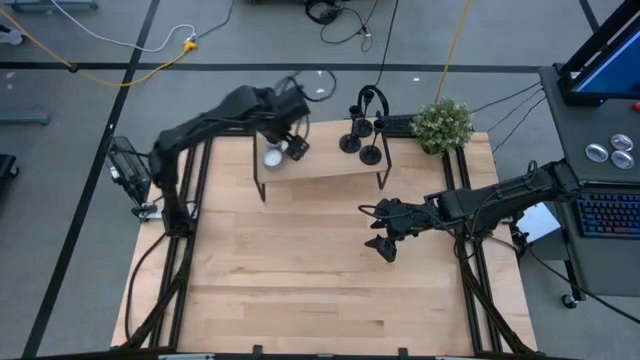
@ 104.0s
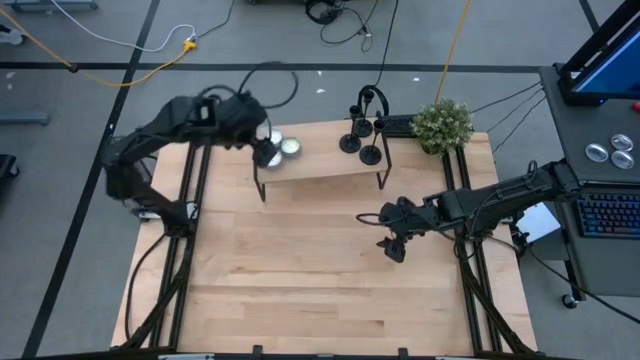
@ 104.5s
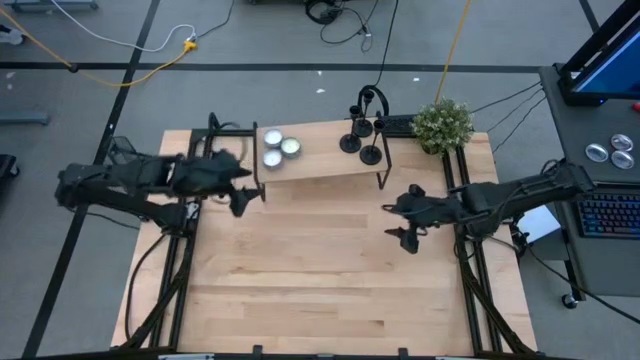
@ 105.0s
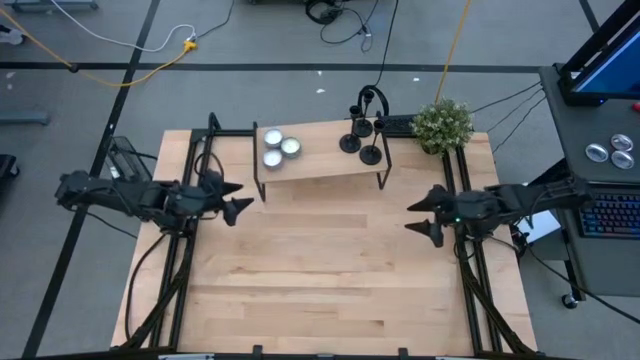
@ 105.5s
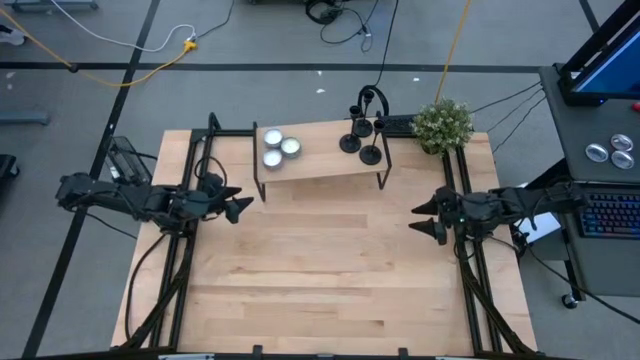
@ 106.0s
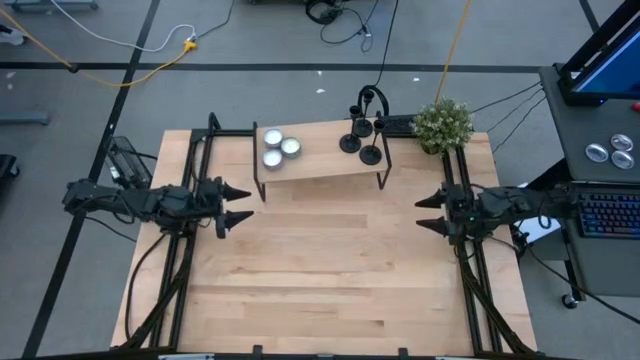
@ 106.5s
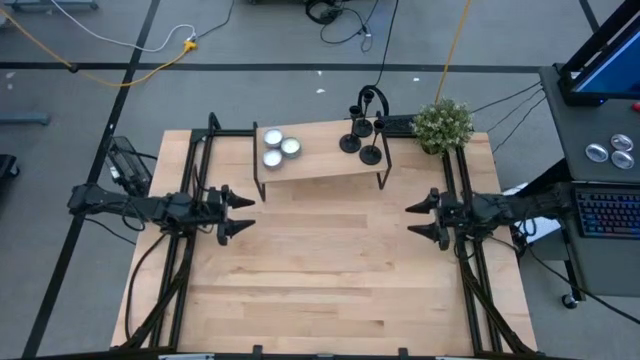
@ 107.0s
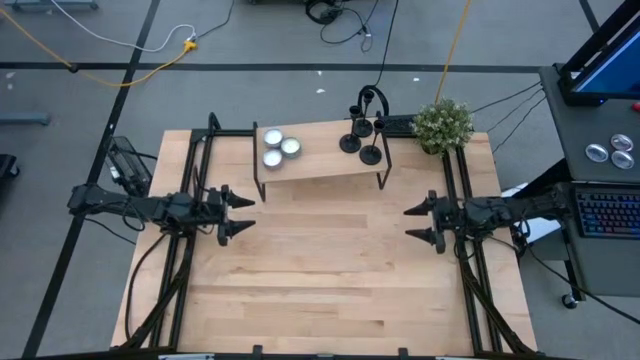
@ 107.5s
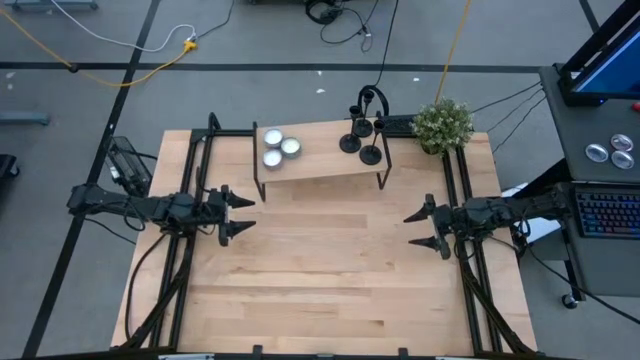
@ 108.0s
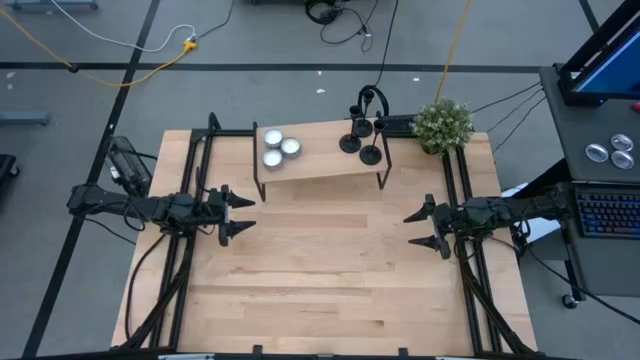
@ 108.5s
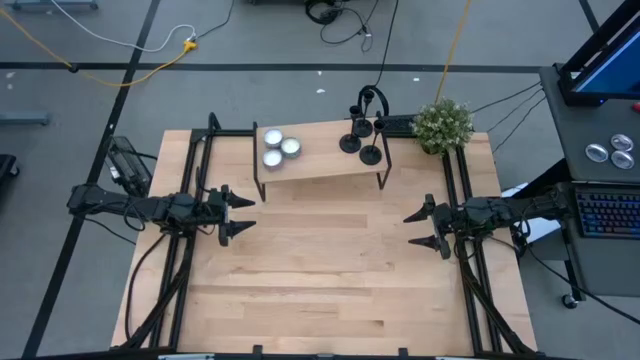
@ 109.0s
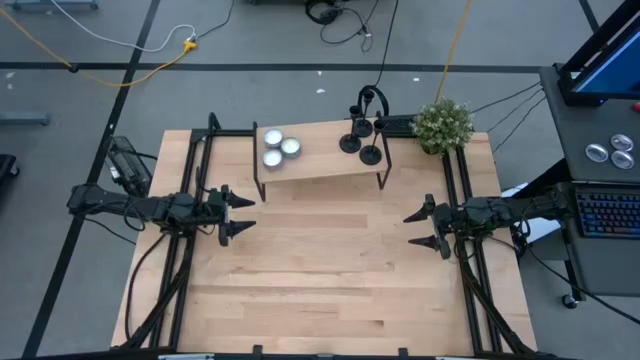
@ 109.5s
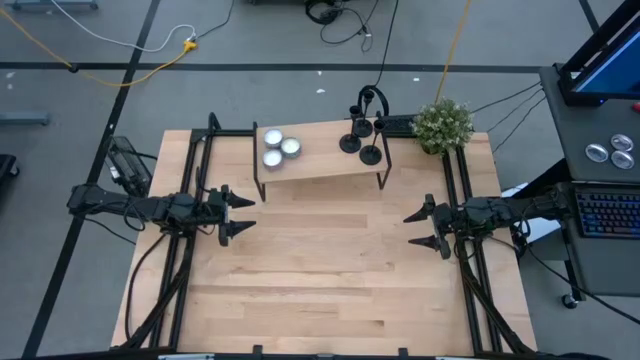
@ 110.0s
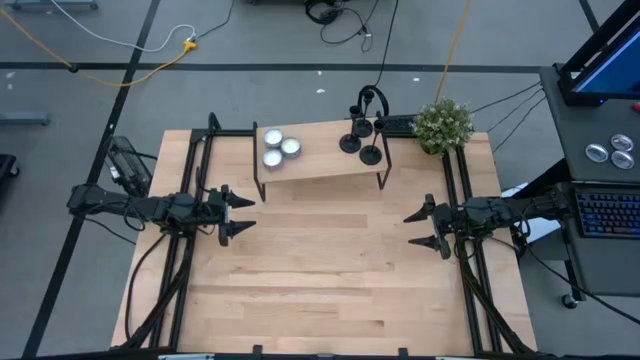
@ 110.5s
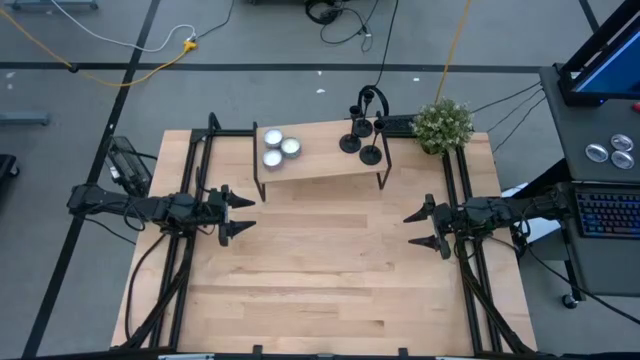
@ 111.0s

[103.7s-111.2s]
Task: Pick & Place candle stick holders
Return to Home Position

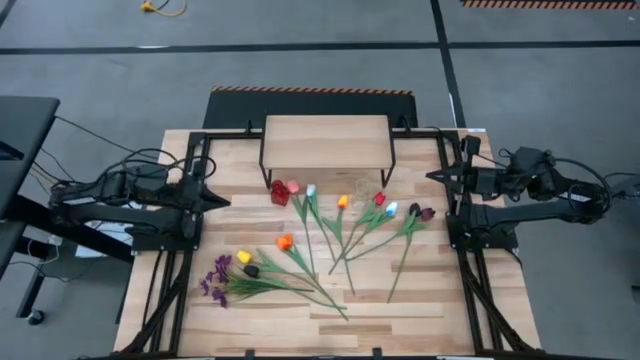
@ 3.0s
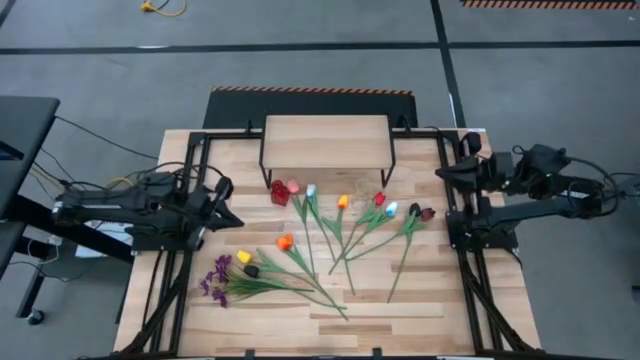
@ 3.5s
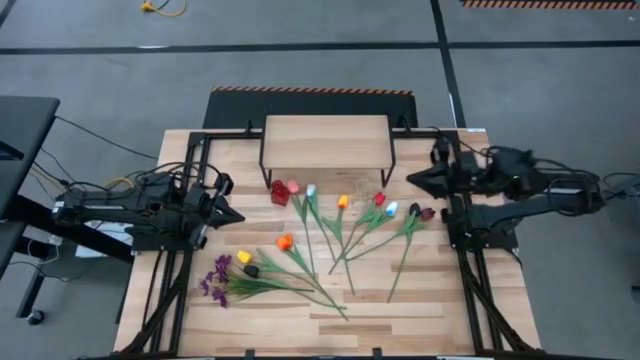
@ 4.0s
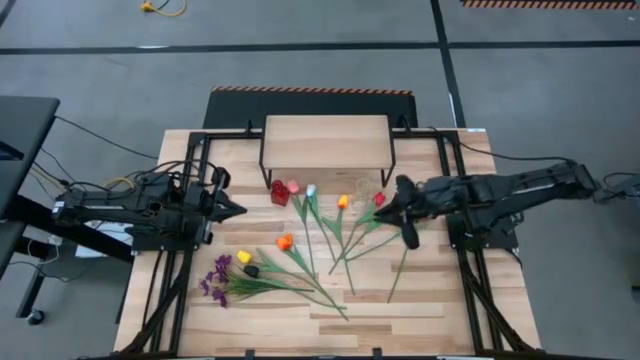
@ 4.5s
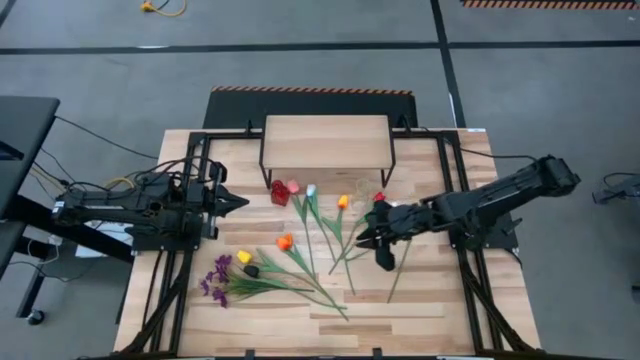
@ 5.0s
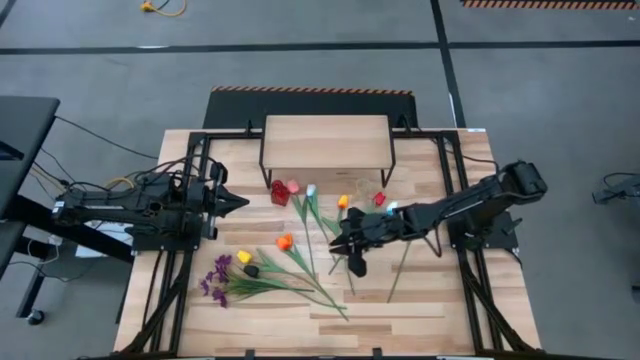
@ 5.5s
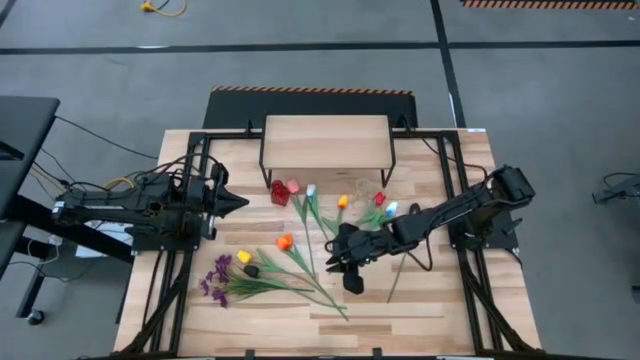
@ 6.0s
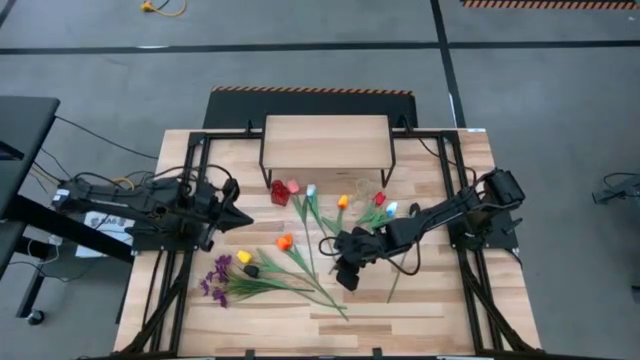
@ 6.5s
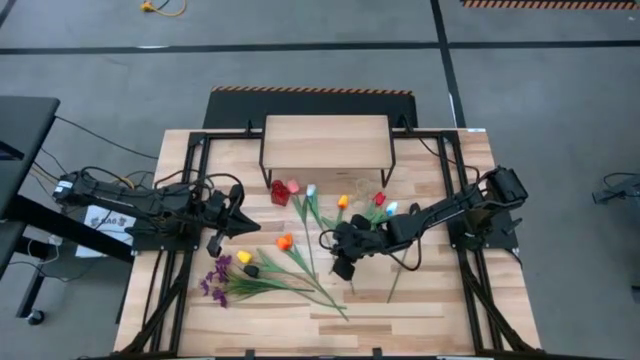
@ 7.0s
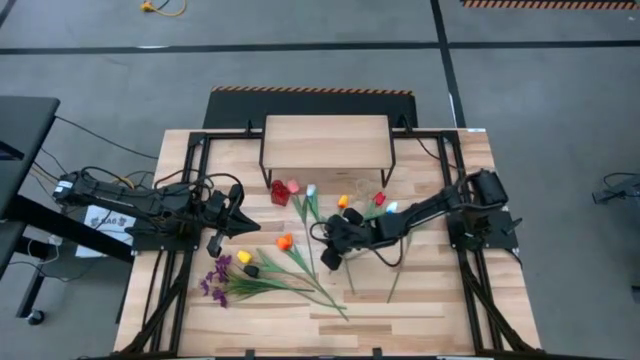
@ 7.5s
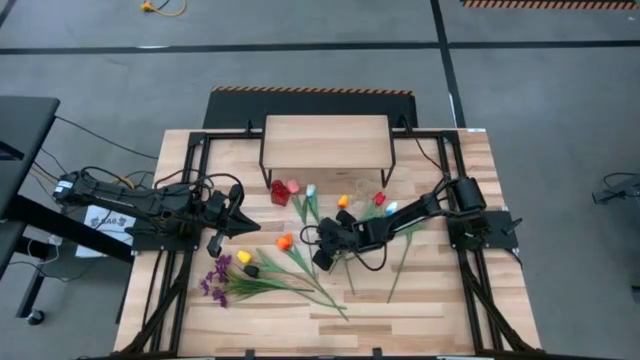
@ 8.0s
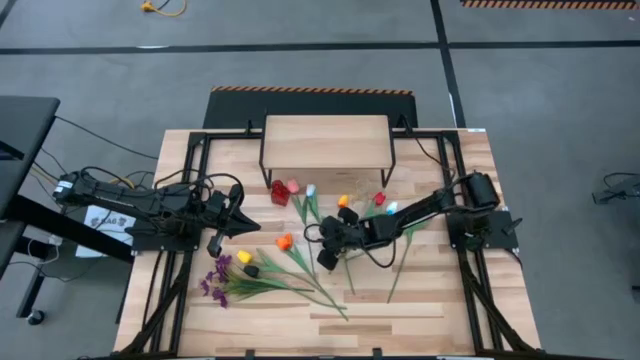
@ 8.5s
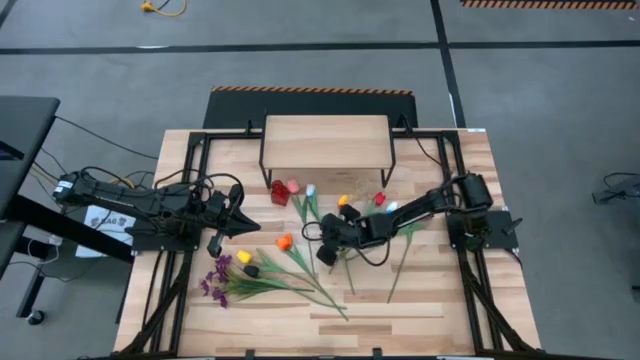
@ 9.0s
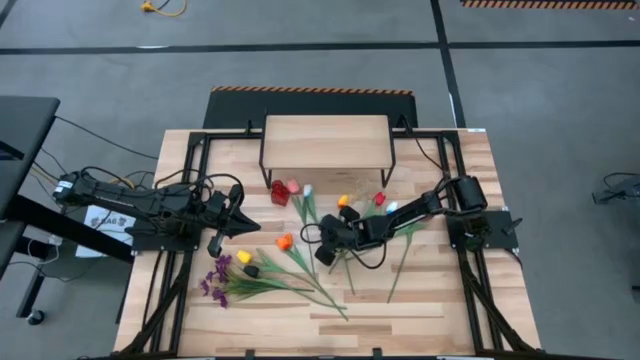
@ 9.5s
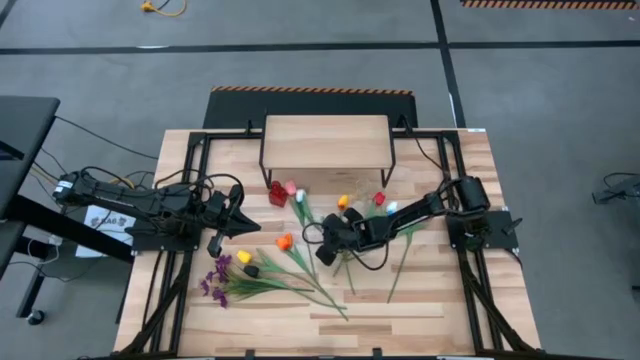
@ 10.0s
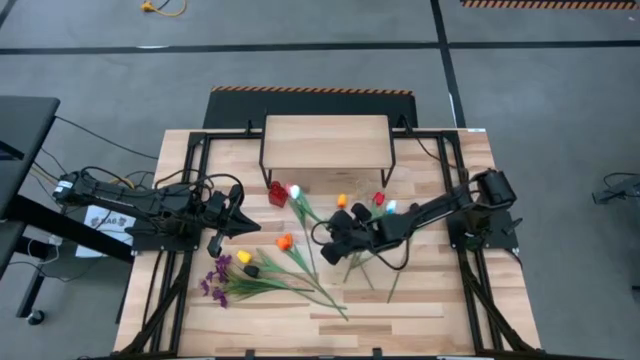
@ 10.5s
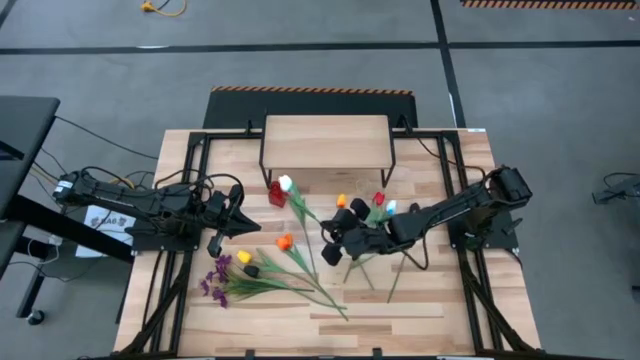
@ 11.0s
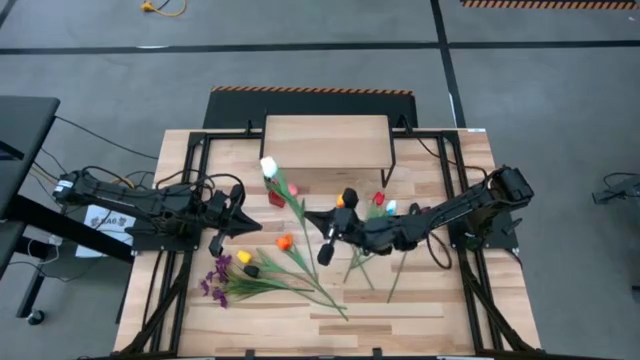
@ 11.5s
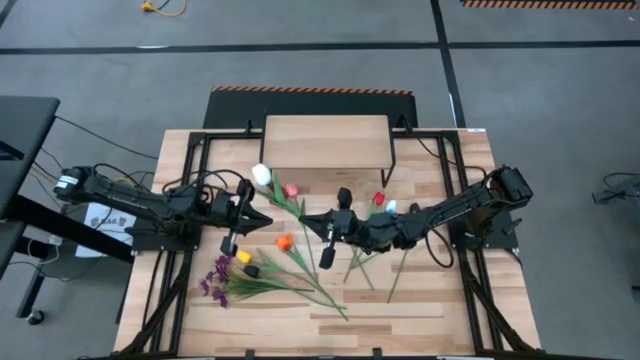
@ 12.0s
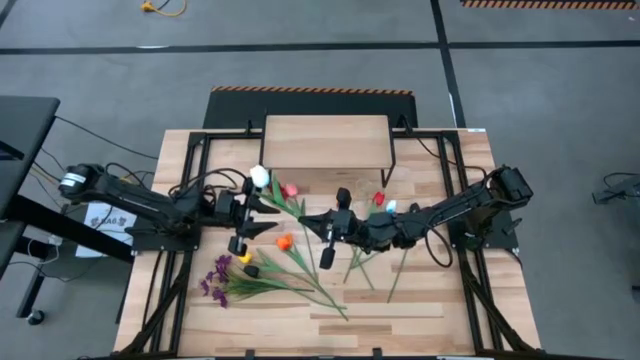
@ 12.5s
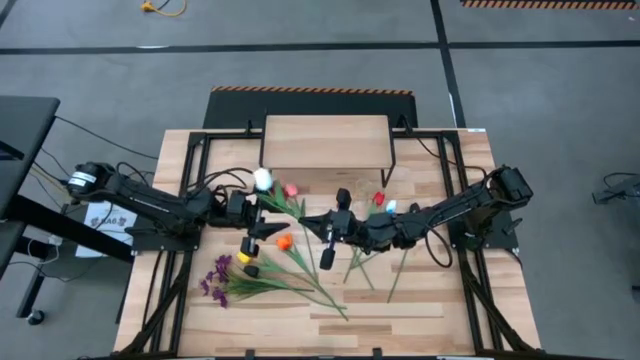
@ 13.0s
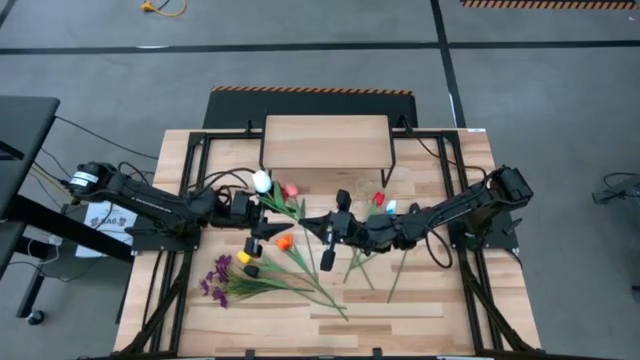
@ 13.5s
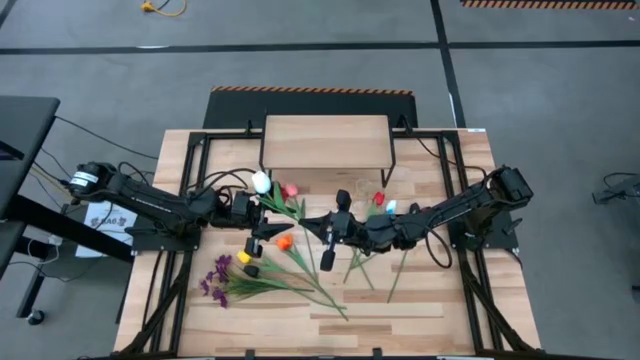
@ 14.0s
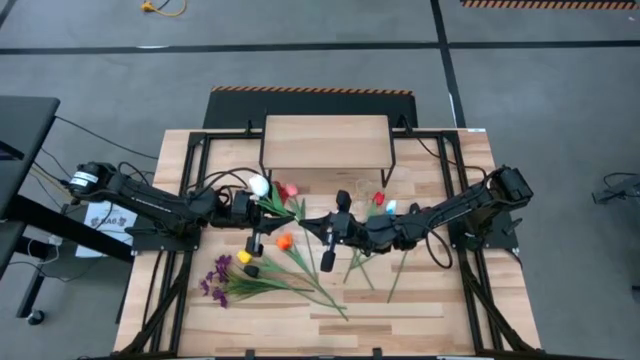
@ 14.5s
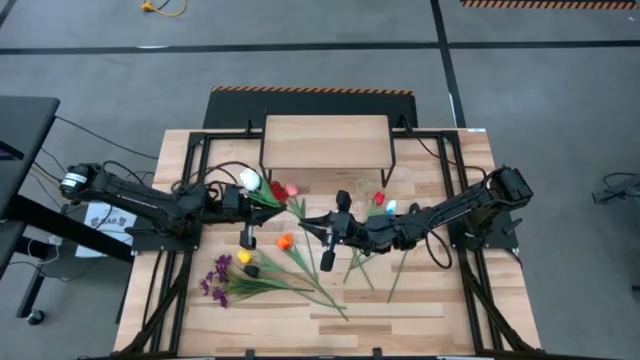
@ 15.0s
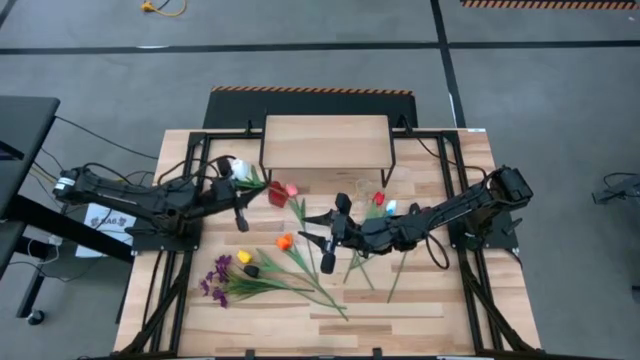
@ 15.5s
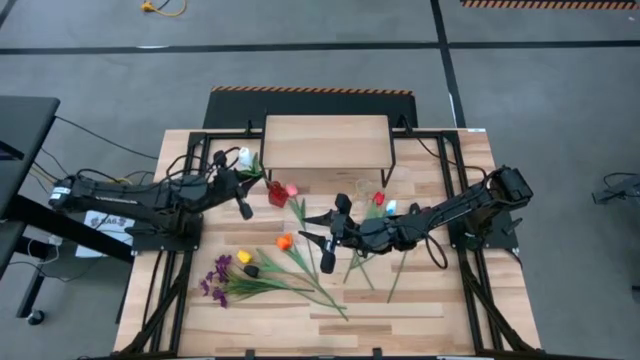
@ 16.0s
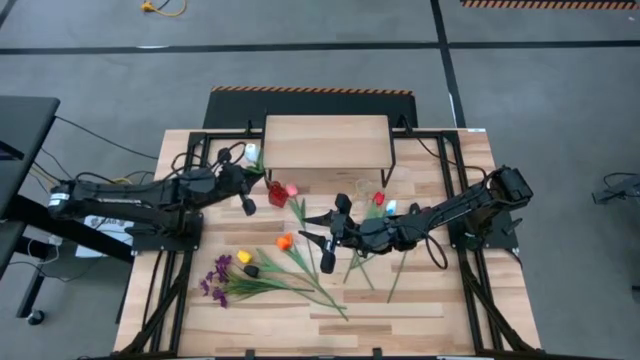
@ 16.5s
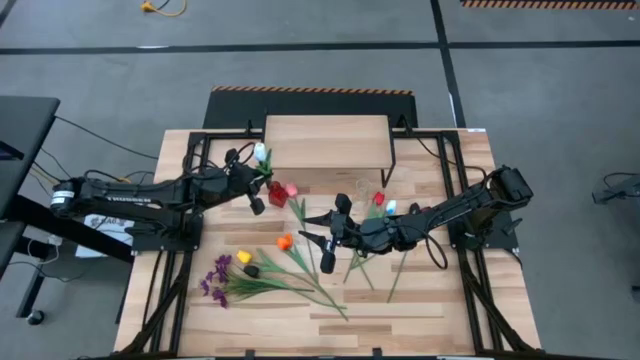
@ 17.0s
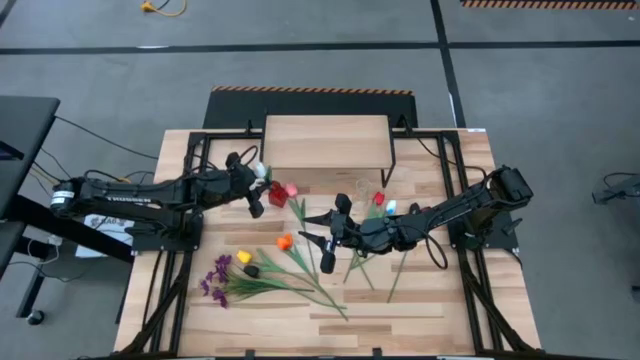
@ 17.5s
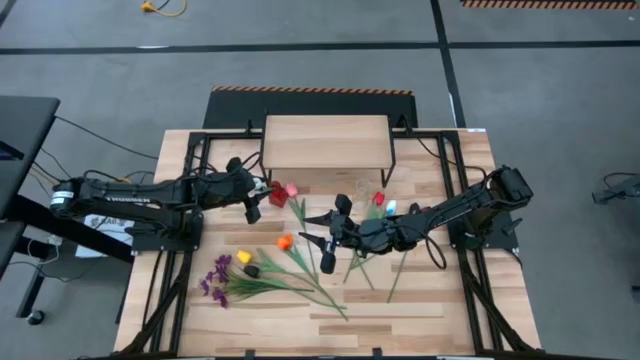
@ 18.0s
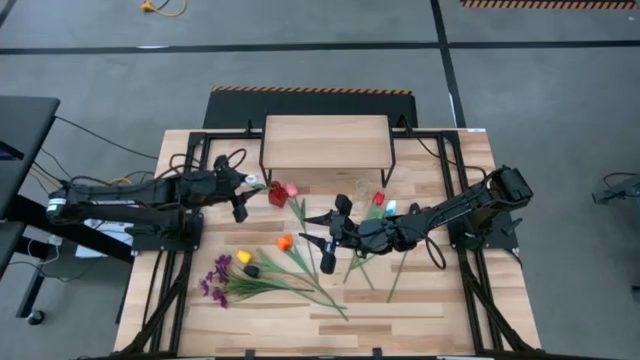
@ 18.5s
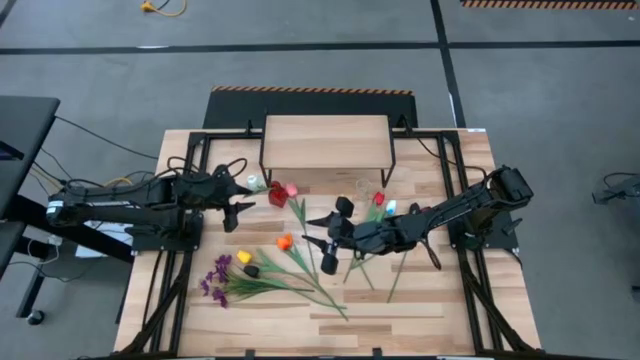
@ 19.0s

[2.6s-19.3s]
Task: Pick and place flowers into a vace then onto a shelf
Put the left white flower into the red flower vase
